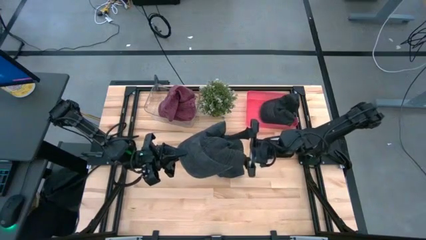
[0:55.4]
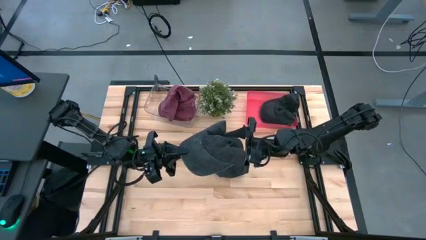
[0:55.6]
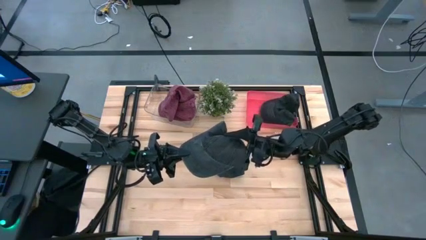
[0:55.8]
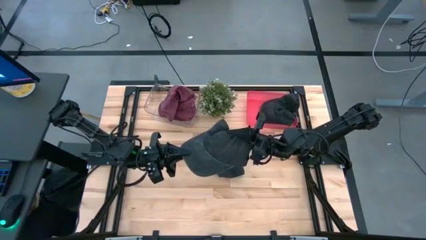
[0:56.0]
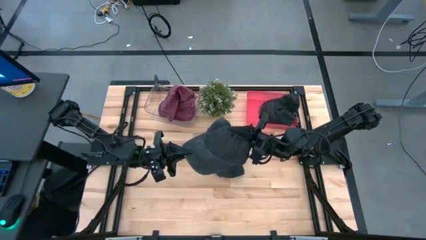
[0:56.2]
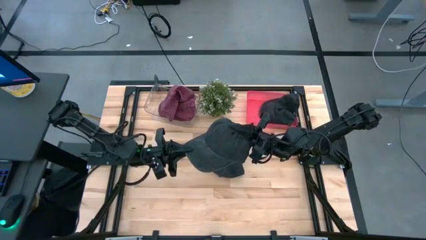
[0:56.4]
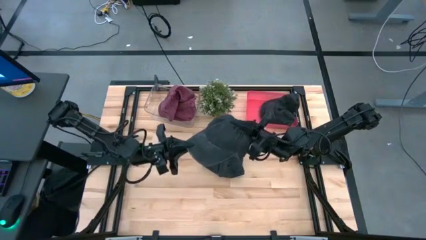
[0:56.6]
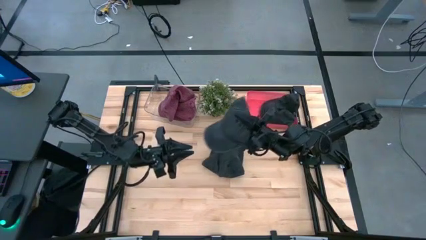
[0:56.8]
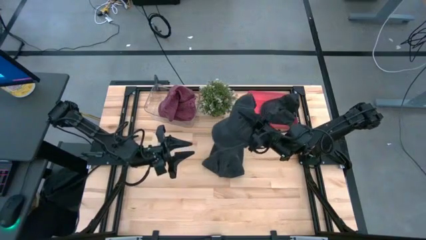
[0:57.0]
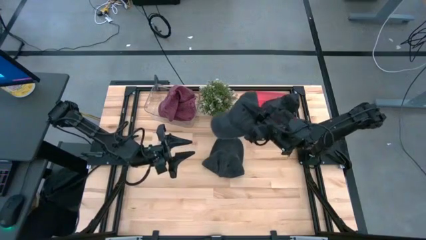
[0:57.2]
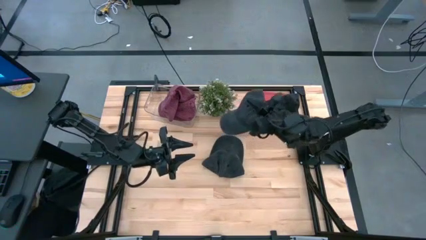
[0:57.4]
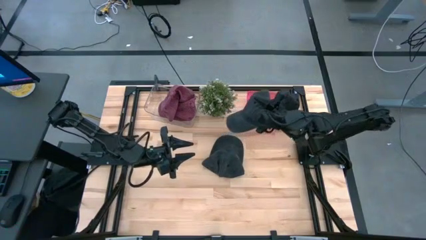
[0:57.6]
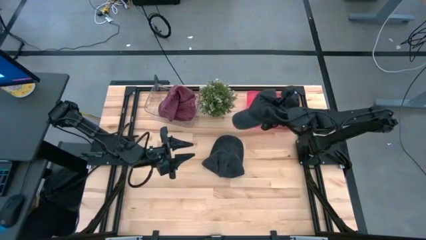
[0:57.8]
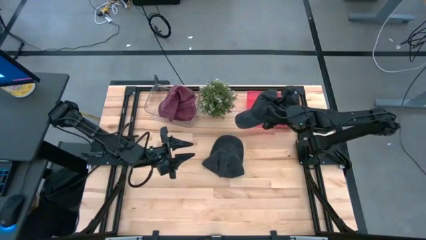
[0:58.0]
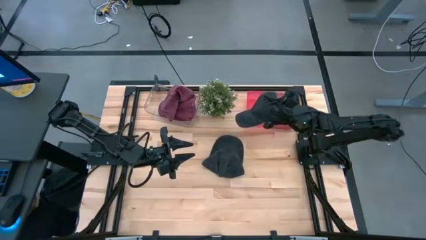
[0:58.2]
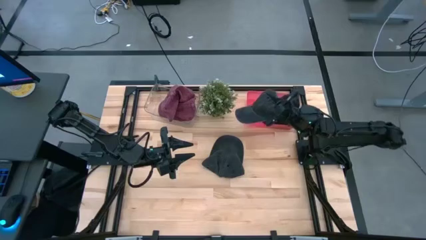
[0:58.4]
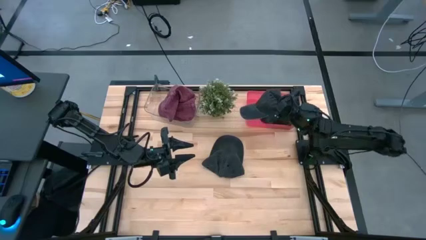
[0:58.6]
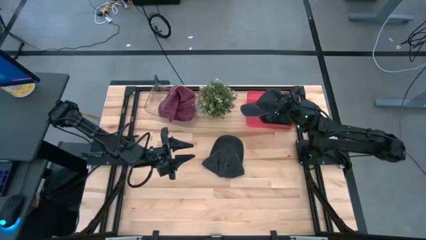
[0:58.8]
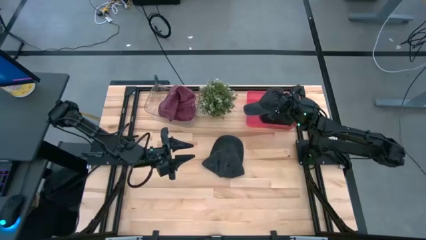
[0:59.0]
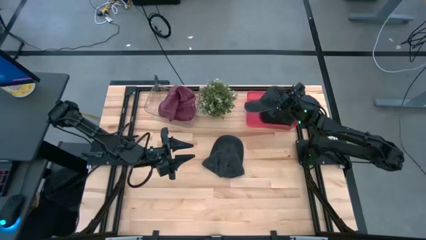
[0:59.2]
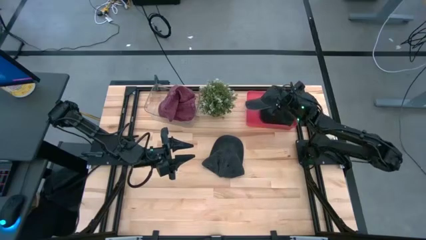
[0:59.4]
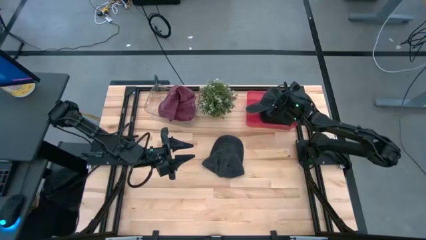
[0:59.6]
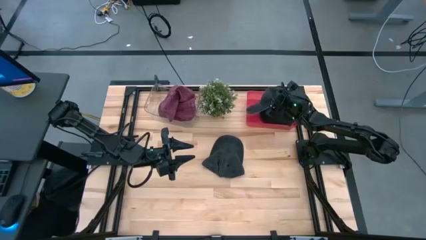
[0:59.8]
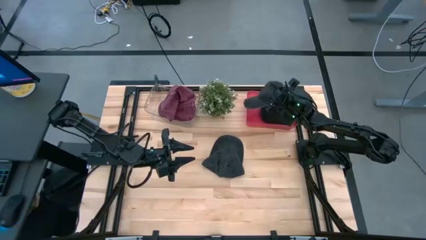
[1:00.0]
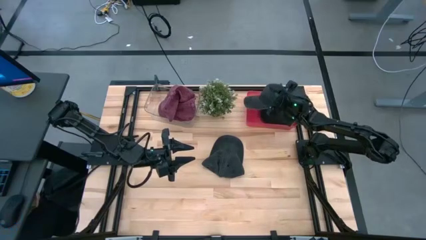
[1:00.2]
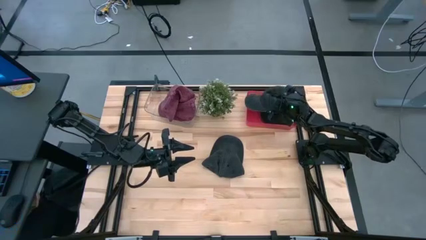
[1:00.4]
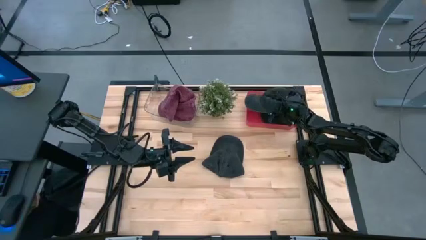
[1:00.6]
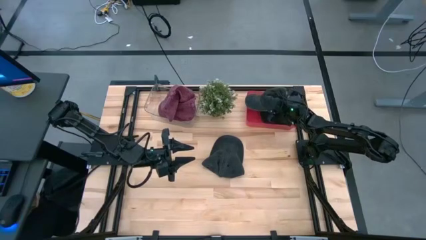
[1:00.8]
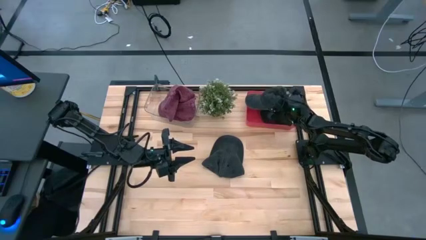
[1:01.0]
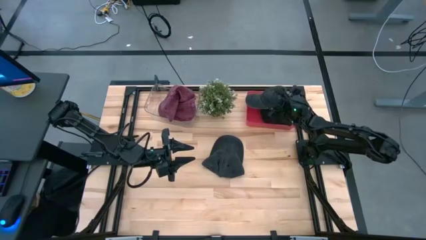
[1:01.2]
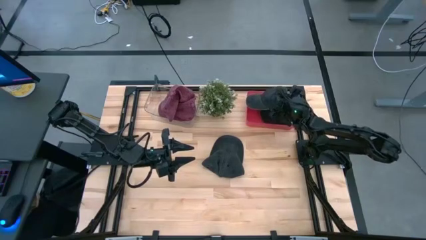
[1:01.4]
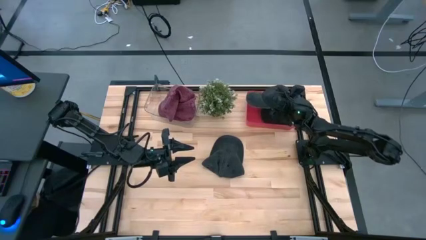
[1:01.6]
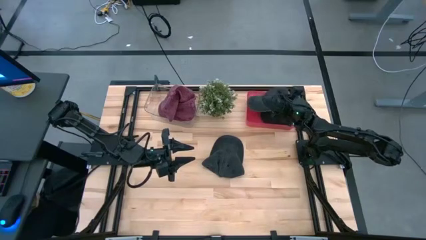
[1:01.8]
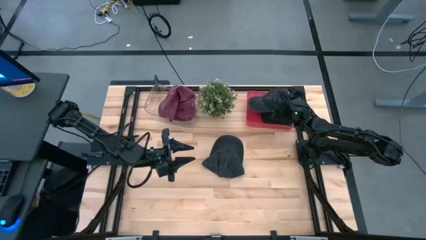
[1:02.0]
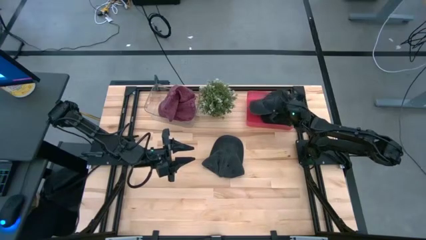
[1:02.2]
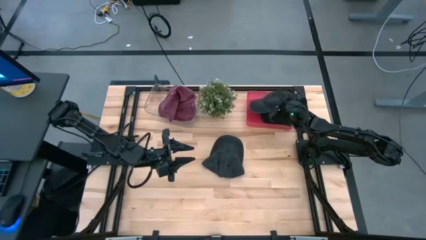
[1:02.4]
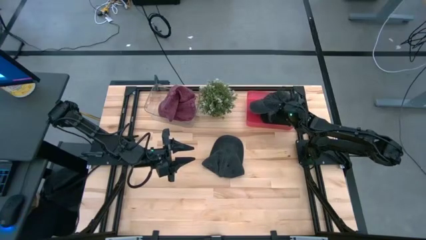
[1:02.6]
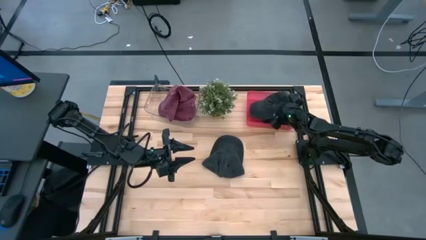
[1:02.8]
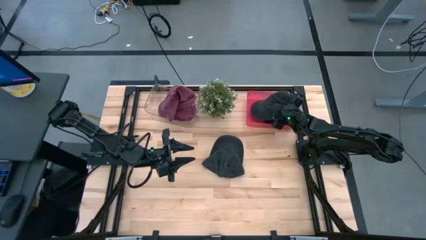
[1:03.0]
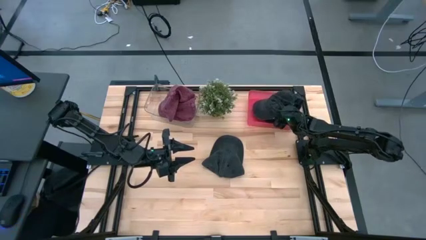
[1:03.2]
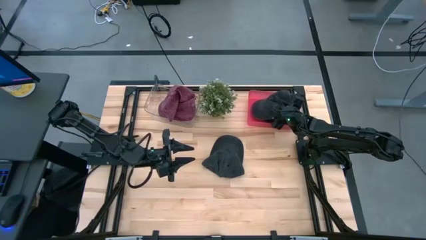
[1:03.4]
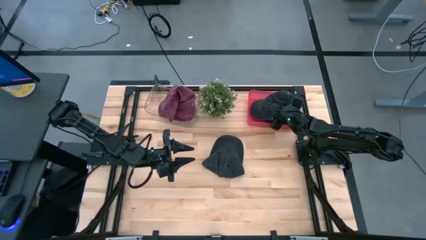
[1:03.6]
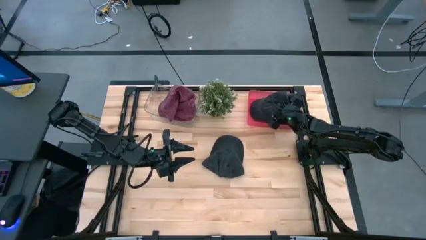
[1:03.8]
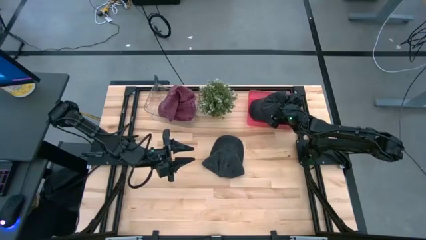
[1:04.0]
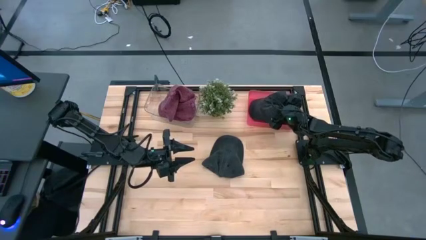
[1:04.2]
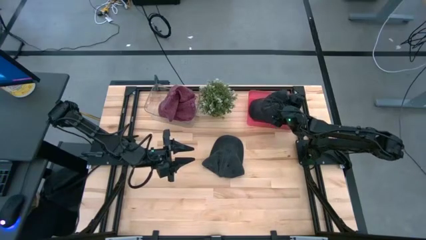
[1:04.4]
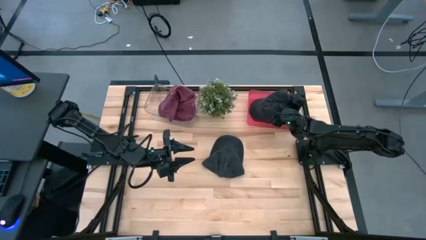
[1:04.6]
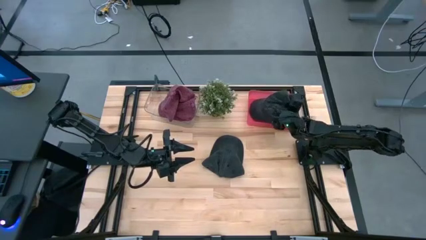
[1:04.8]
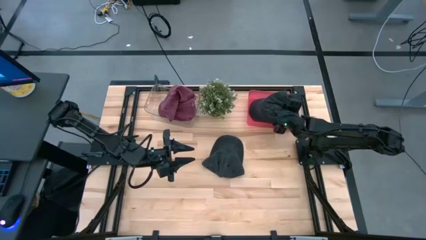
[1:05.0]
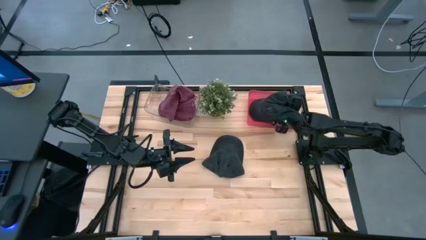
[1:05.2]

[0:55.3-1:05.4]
Task: Pick & Place hat
Put the right black cap into the pink bin

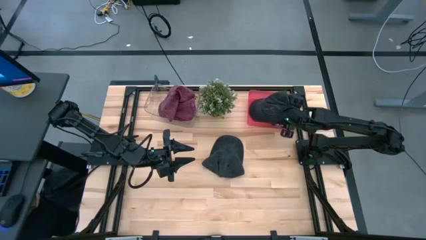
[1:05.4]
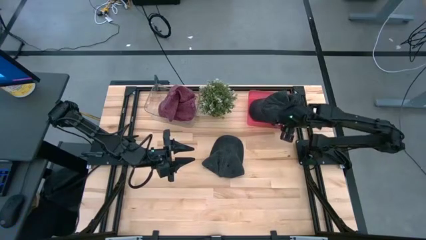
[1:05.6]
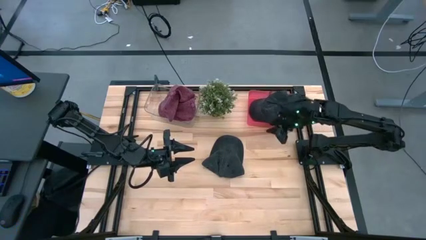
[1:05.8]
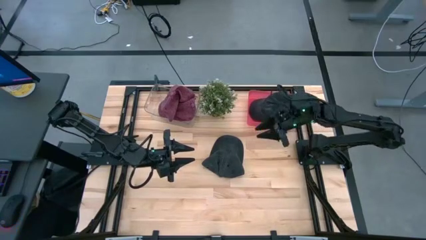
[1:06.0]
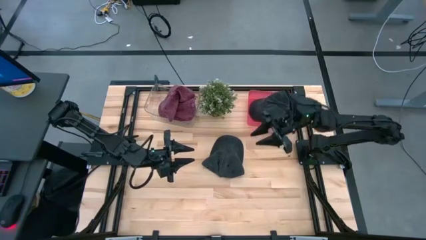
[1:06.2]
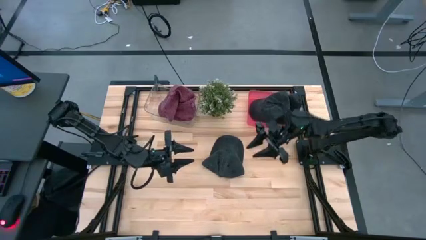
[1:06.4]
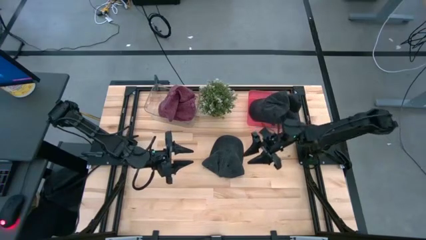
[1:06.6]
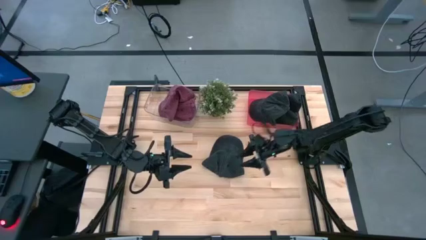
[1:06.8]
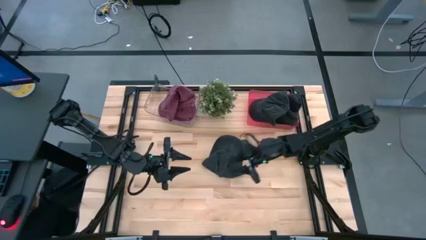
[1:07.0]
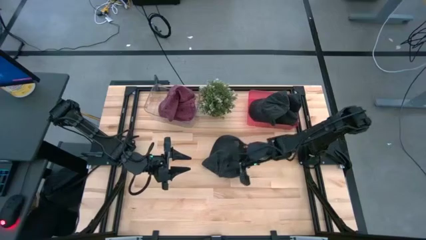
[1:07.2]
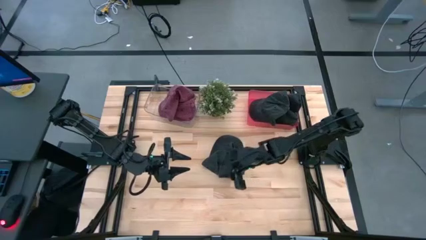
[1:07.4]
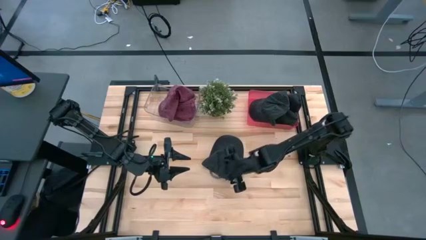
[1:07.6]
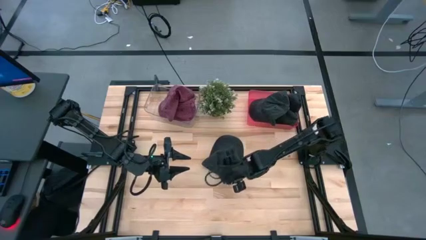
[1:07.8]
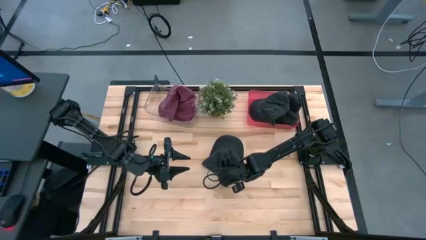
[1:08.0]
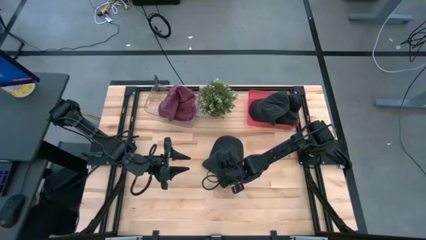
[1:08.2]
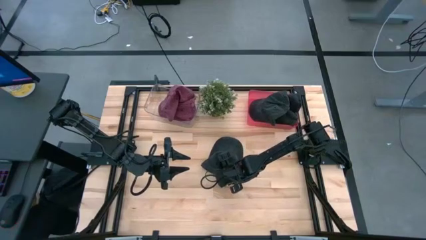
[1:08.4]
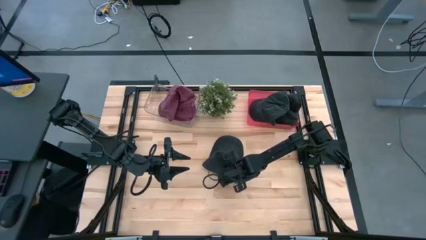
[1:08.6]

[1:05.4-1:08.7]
Put the black cap into the pink bin

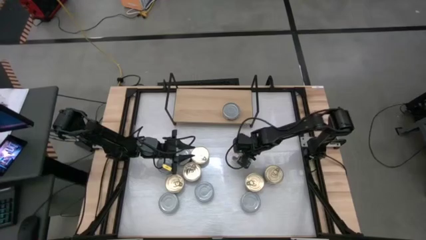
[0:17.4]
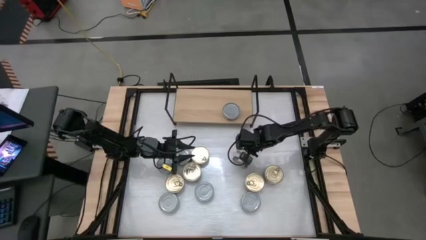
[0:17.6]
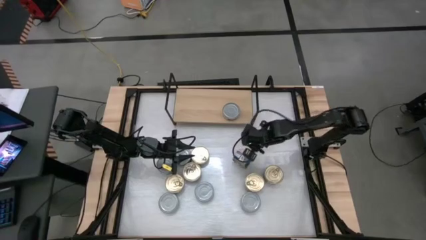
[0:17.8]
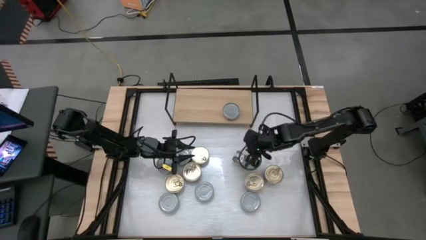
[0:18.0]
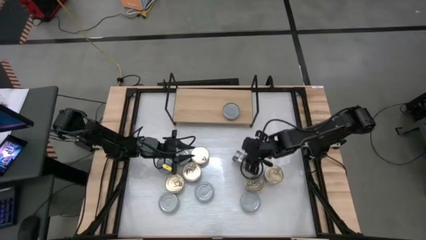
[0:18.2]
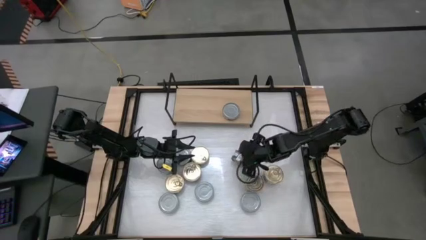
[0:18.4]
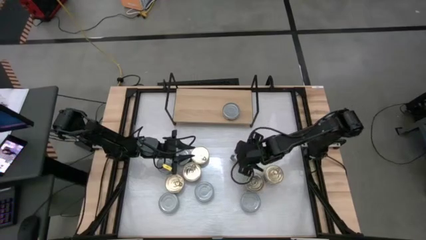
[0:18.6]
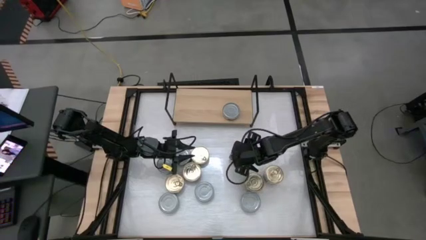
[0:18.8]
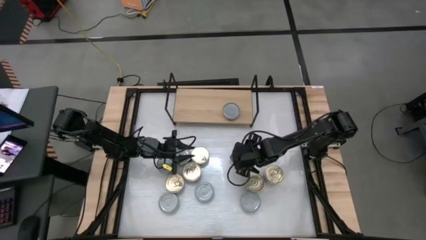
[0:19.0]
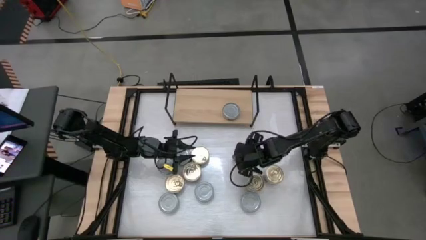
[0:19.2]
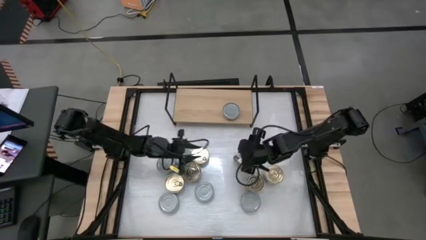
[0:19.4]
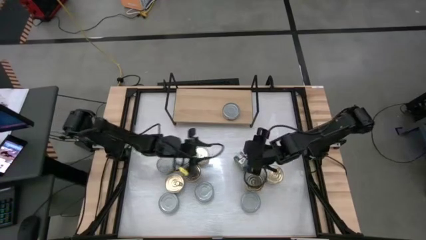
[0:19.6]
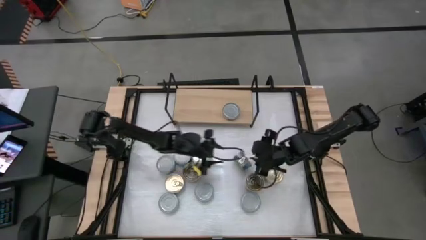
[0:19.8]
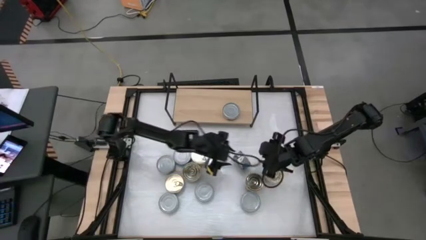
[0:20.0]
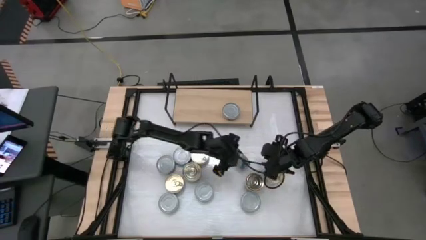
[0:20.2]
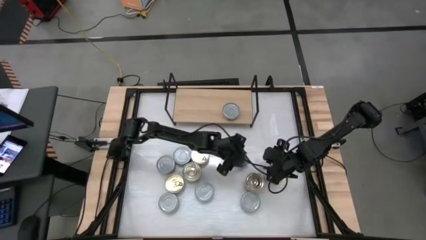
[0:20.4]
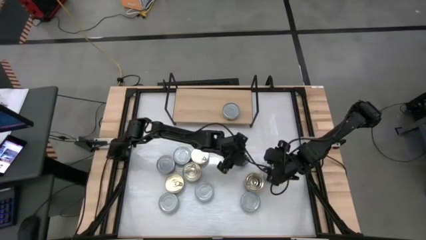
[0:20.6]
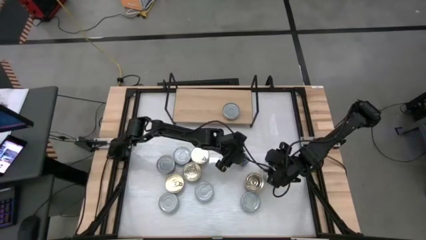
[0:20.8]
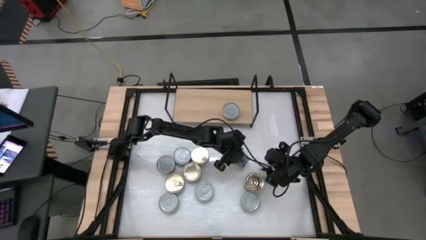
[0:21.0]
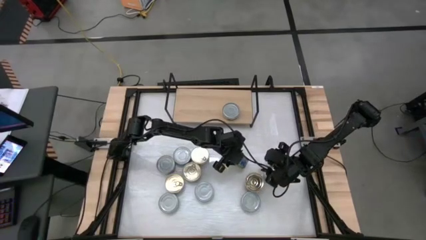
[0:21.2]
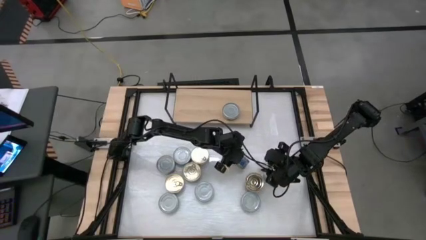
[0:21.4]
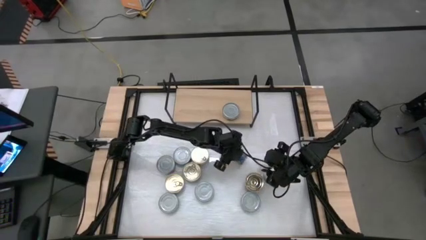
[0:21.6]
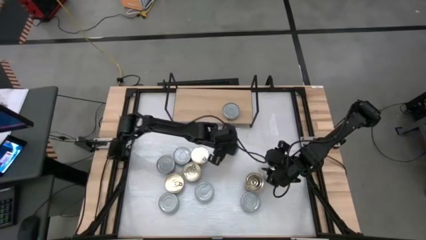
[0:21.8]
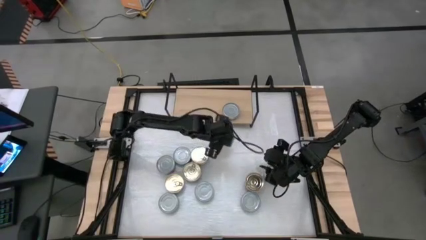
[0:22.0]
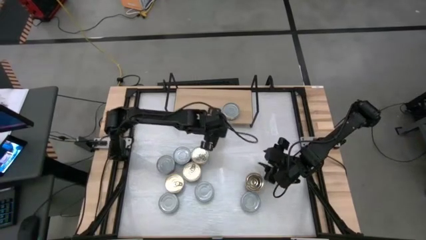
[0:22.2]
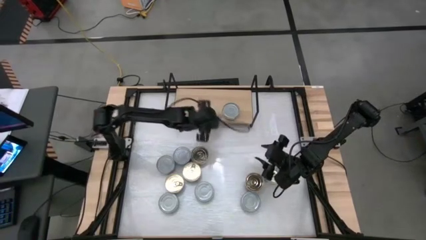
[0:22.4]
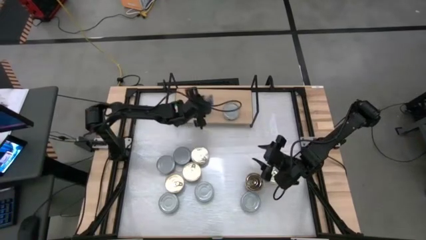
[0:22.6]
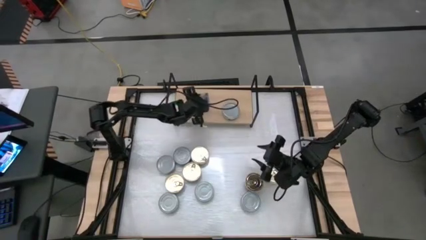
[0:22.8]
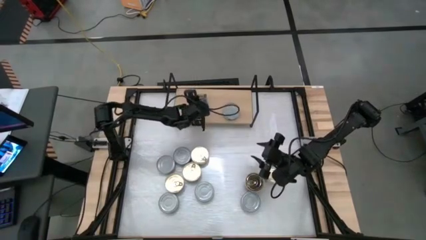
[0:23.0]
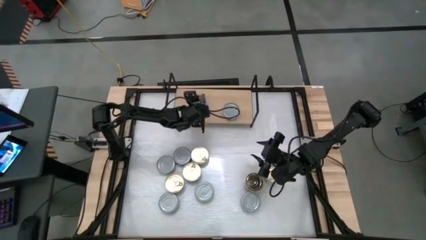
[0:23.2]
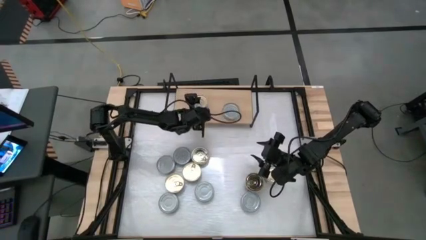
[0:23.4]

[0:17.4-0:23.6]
Task: Stack canned seafood by type on shelf
Put the blue-pink tuna can on the shelf
